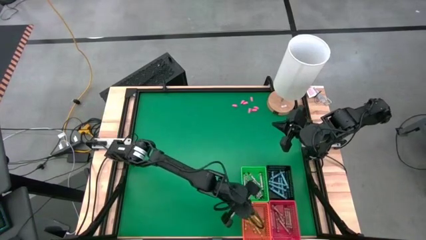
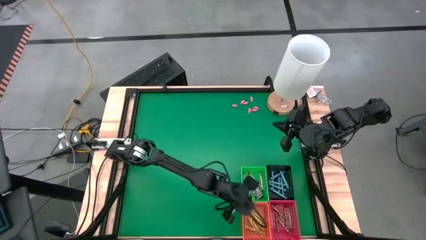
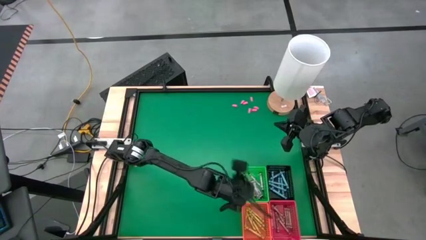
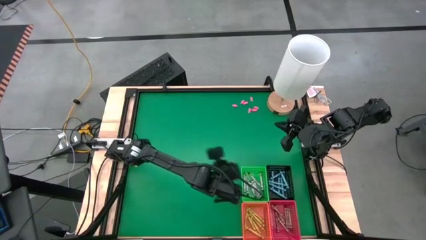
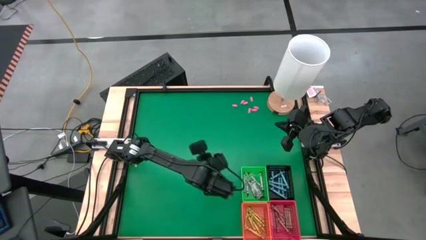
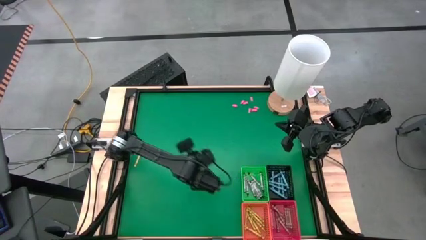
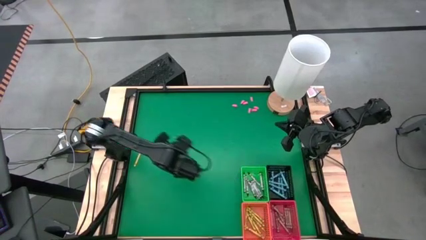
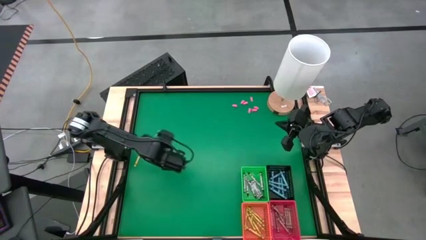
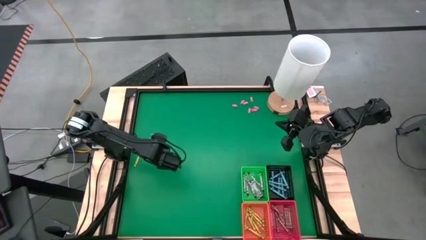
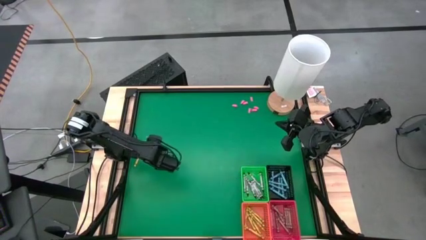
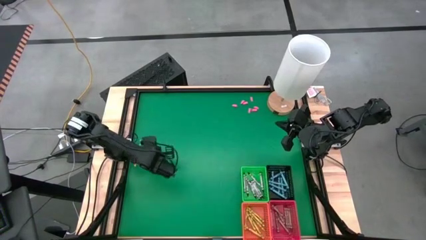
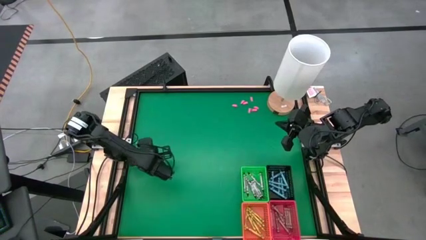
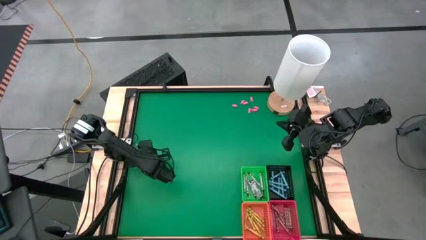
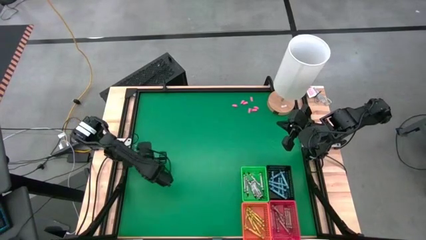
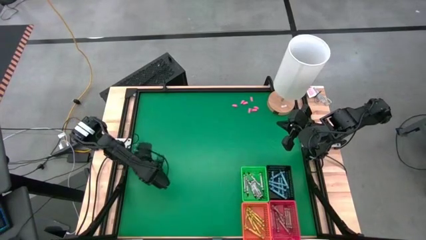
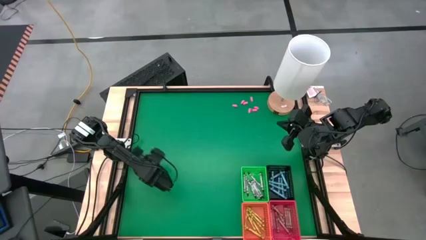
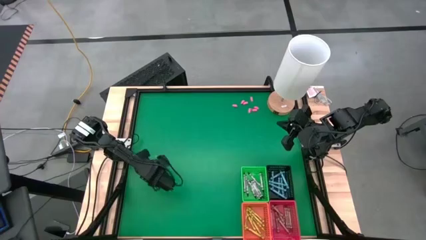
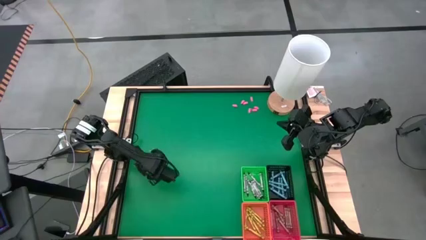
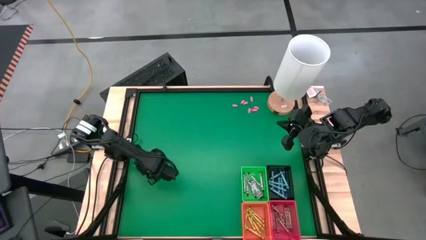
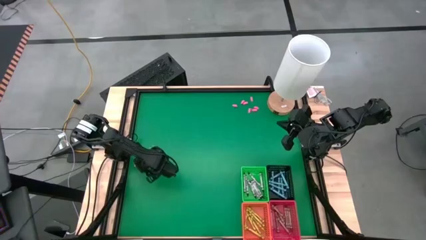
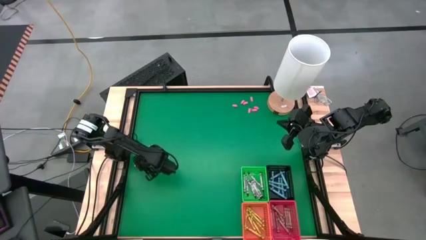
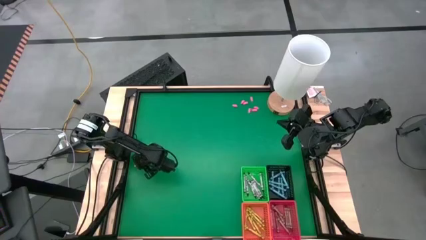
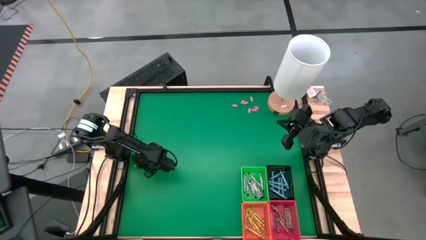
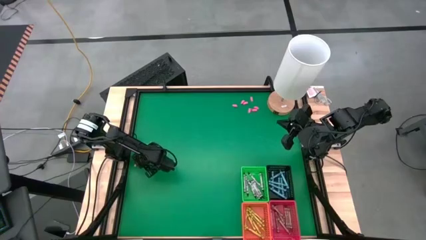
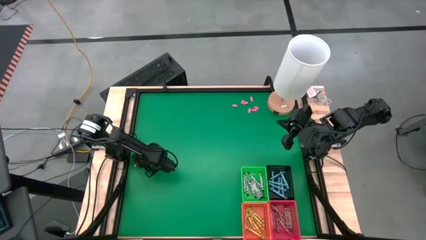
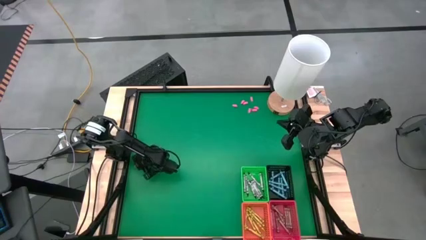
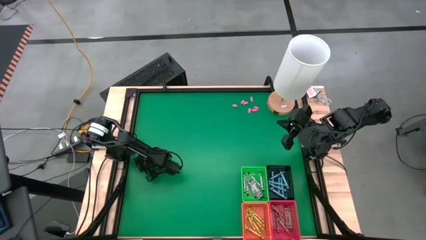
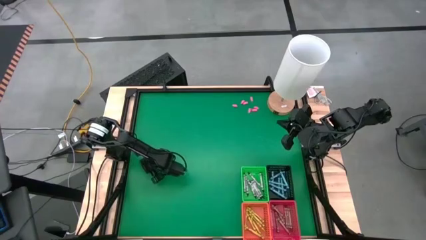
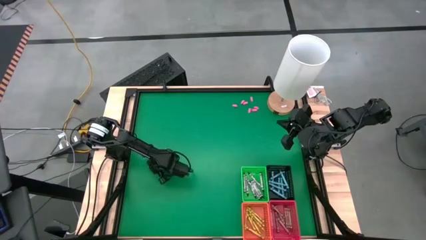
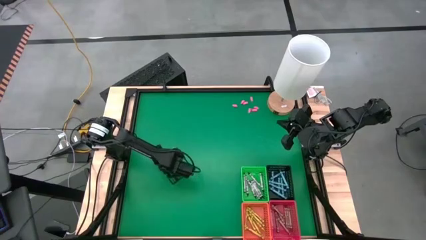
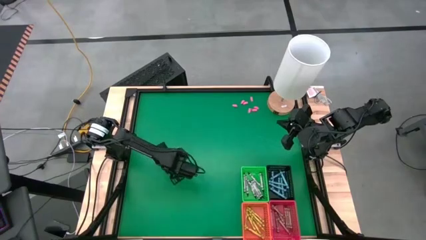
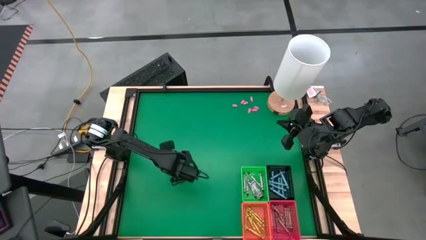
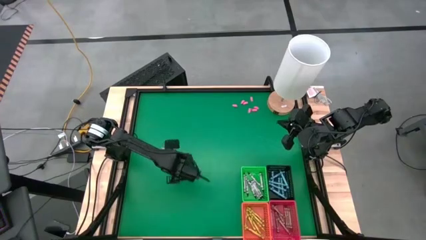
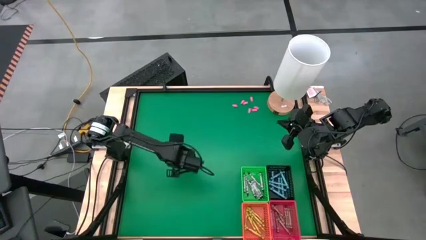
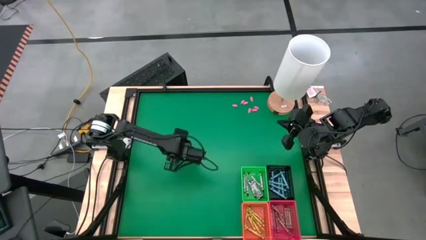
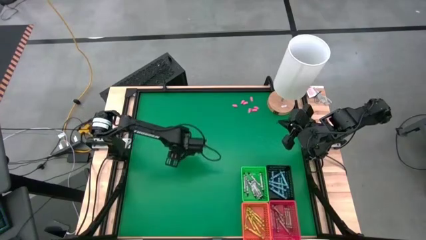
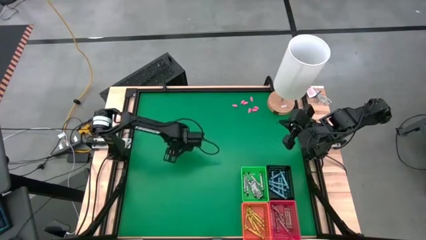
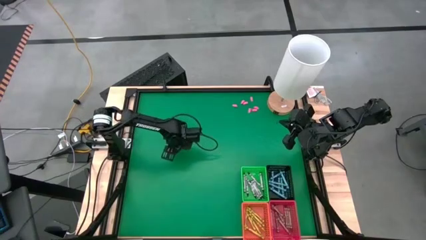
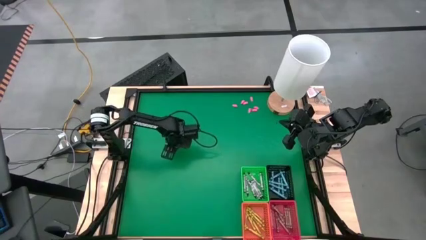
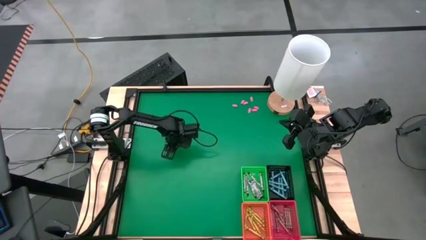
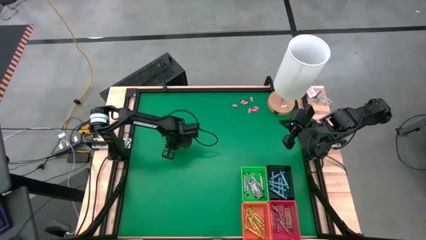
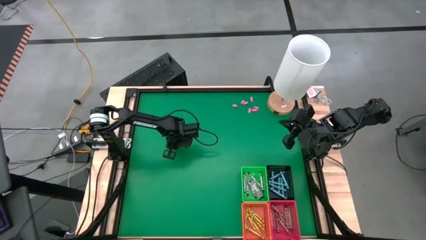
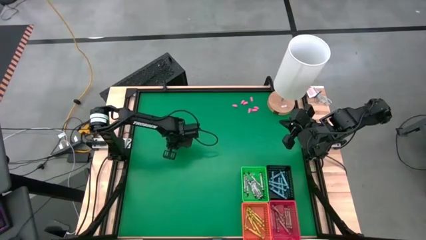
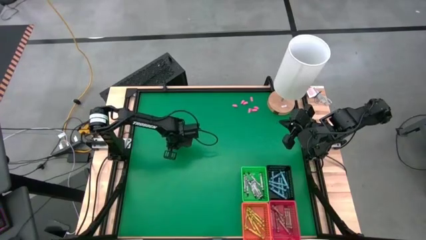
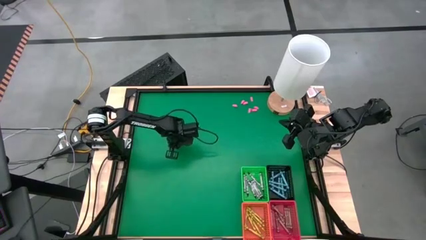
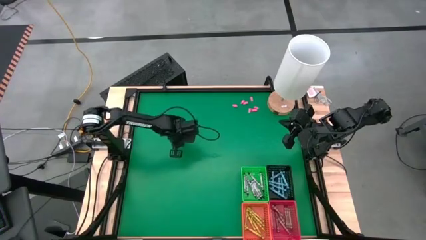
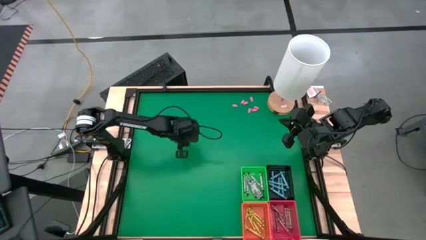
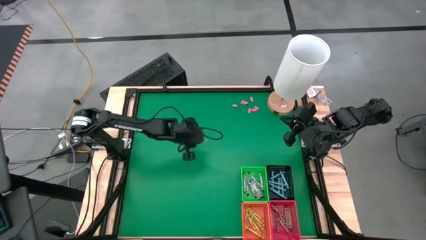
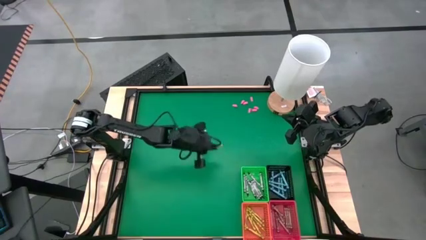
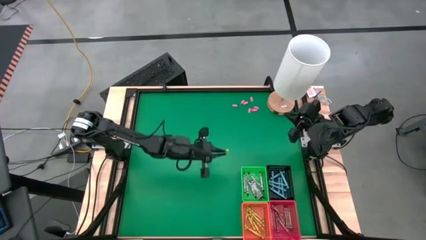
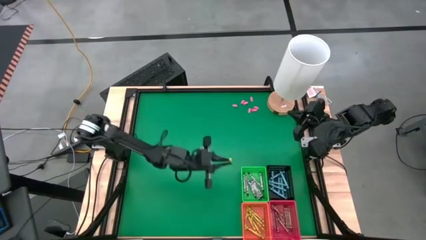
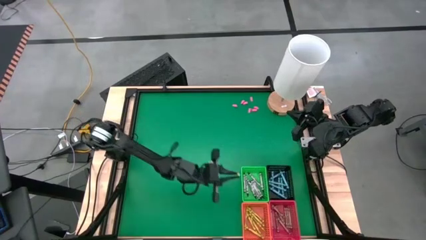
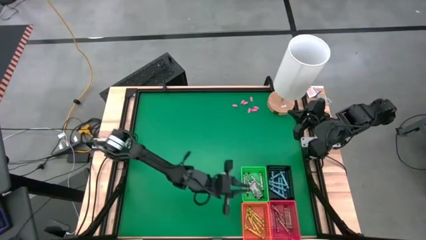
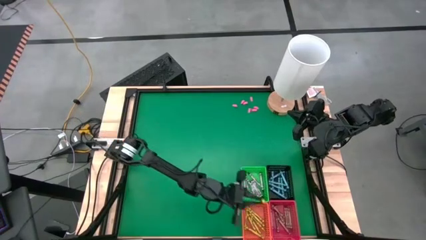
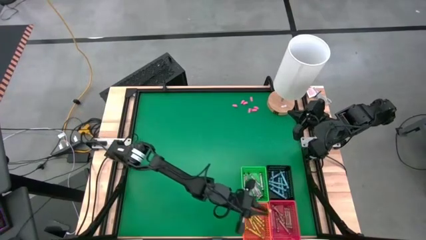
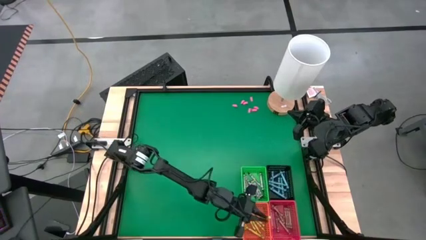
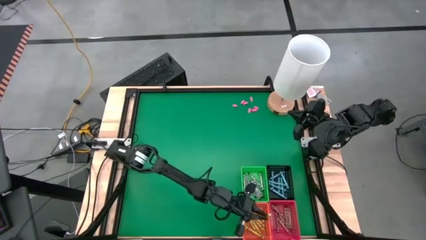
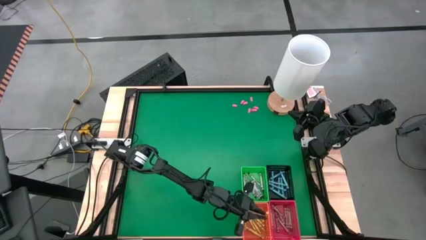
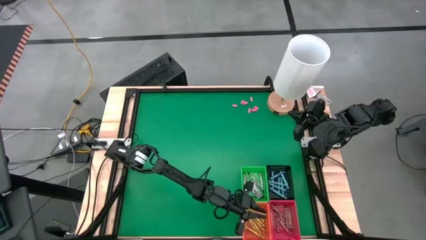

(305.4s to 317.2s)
Task: Sort crayons
Put the light green crayon into the orange bin

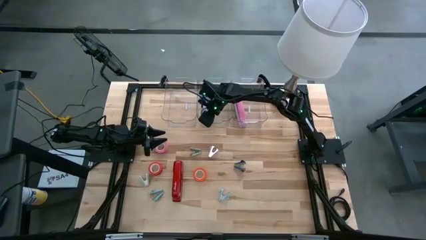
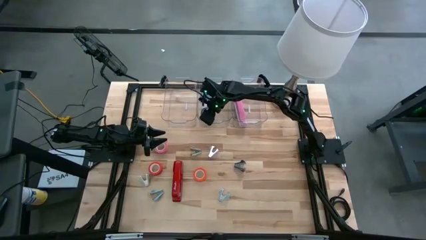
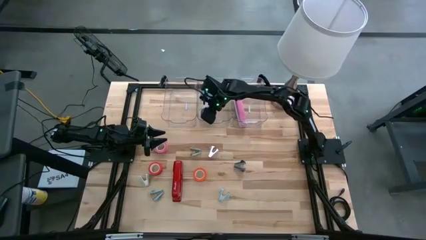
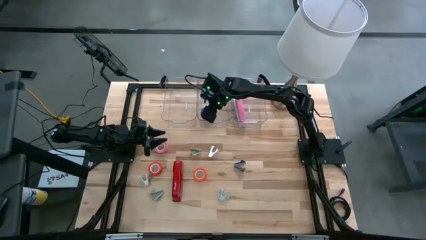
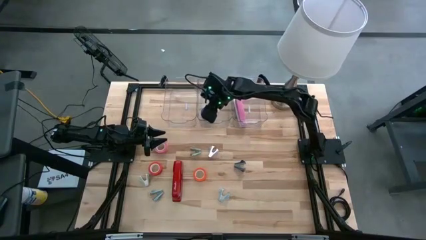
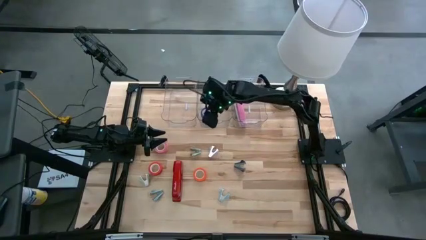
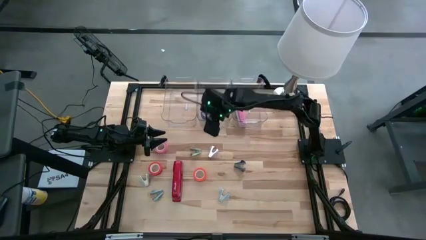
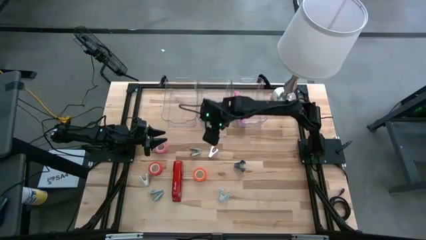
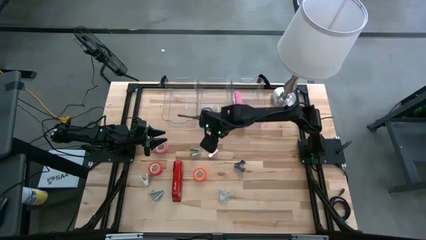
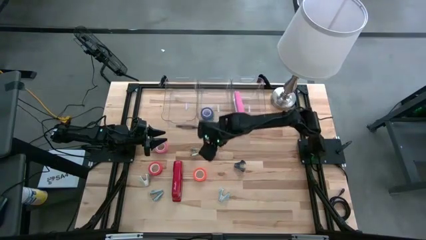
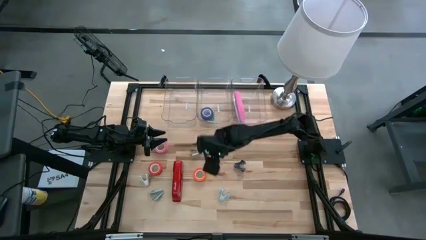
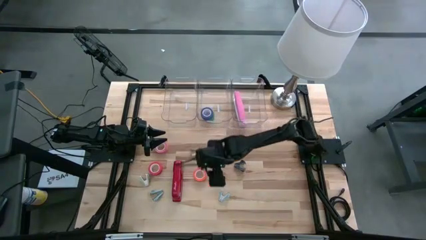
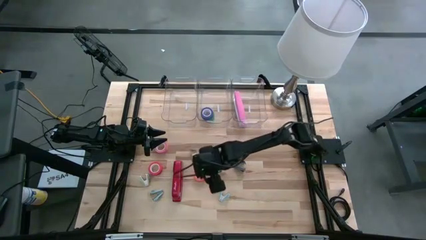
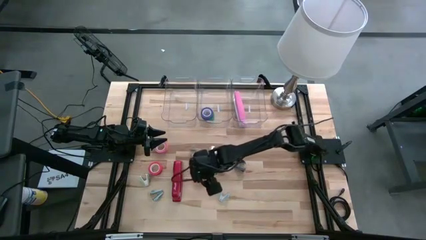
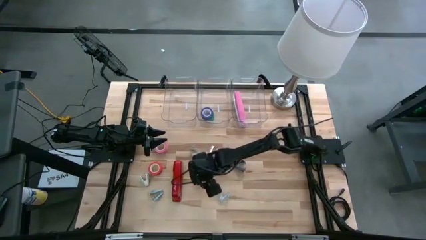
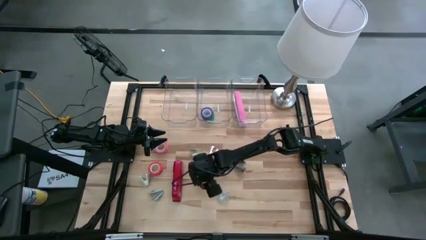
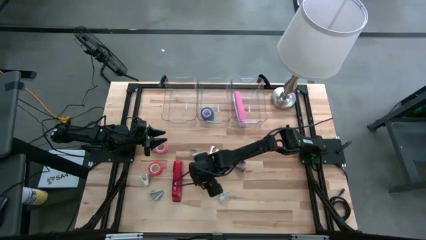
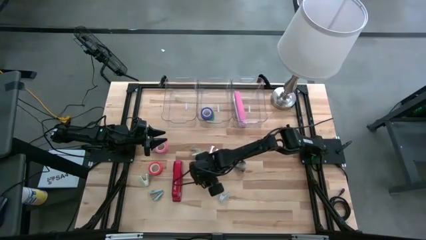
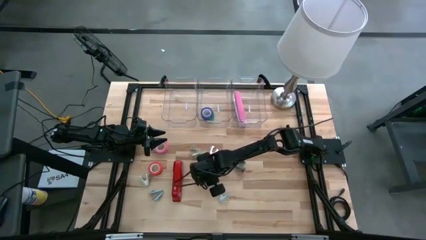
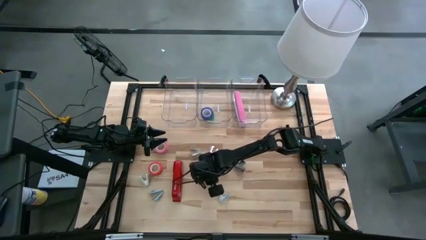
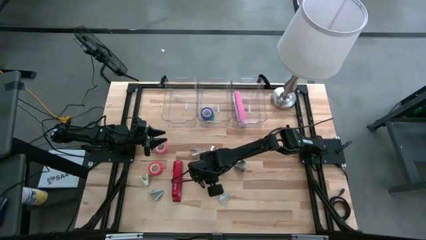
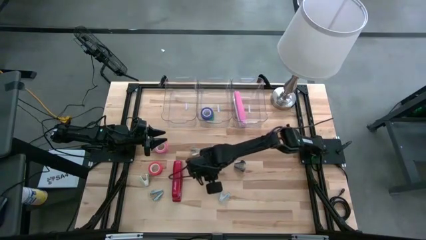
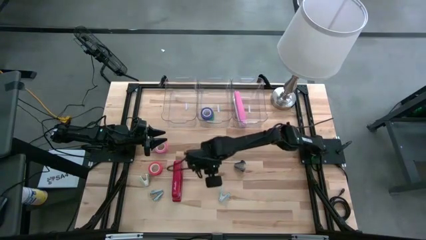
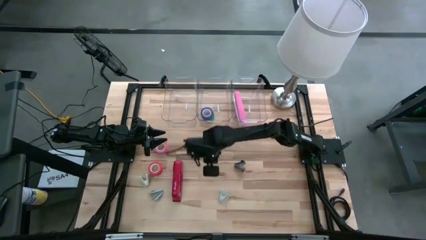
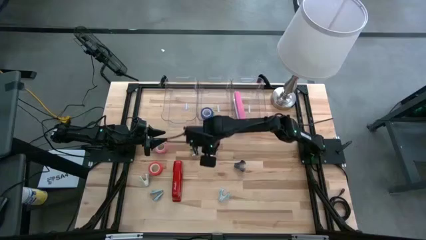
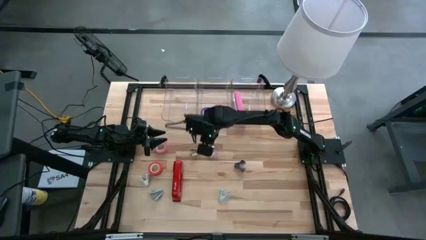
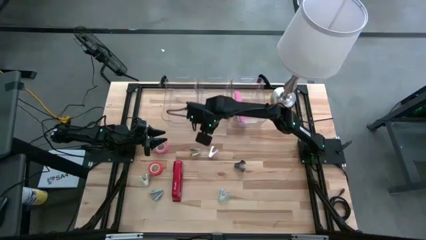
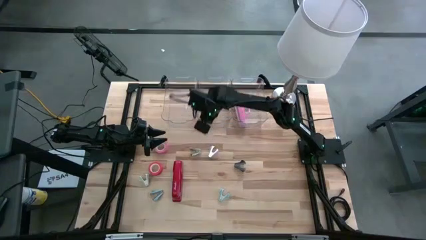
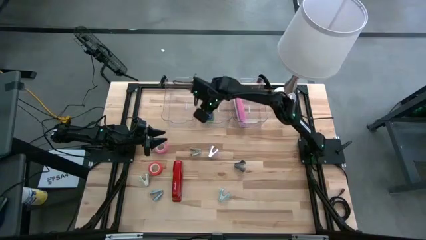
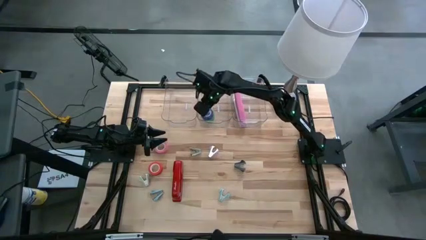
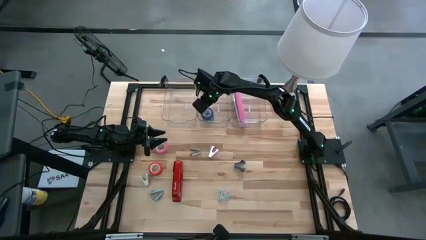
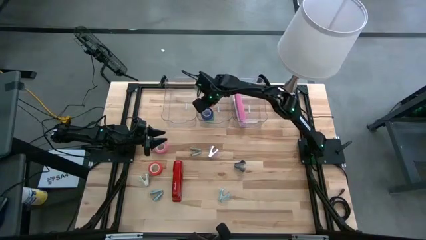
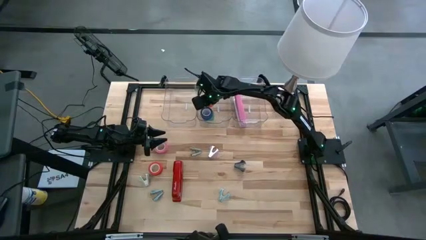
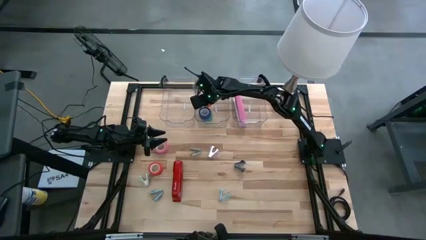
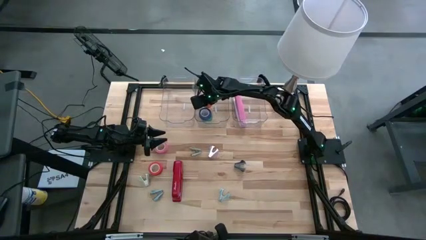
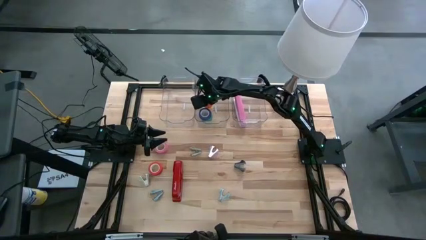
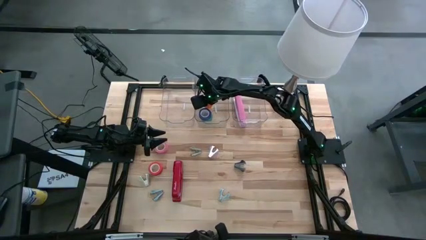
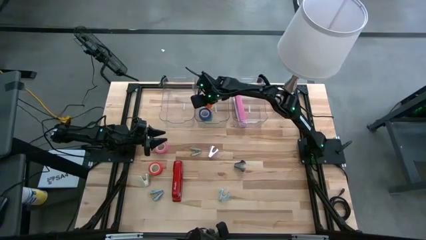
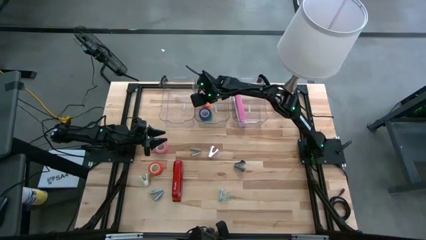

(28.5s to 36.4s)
Task: Pick and place Stapler, Stapler remover, tape
Put the orange tape into the middle transparent bin
